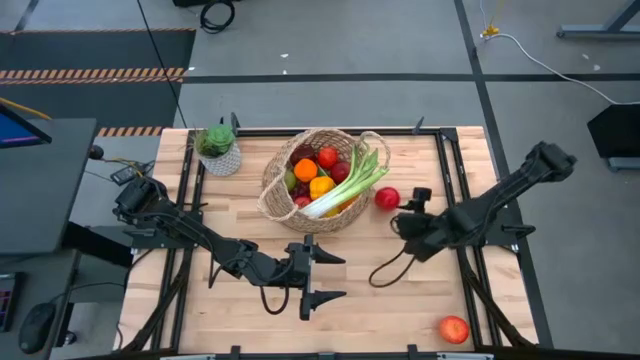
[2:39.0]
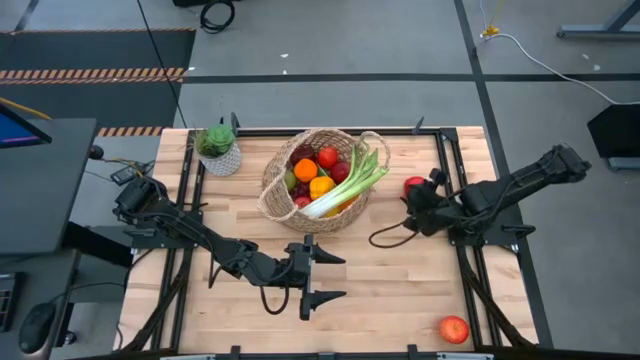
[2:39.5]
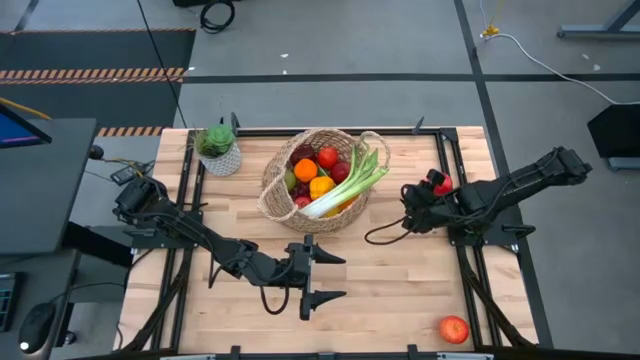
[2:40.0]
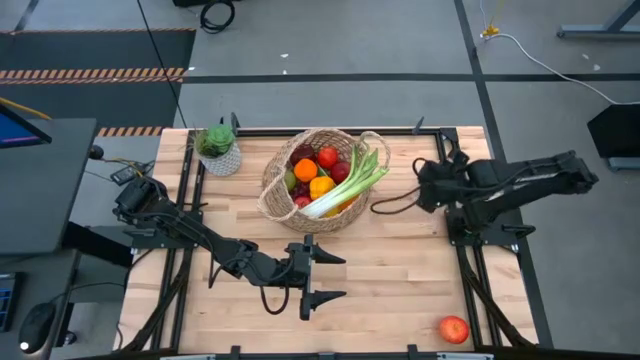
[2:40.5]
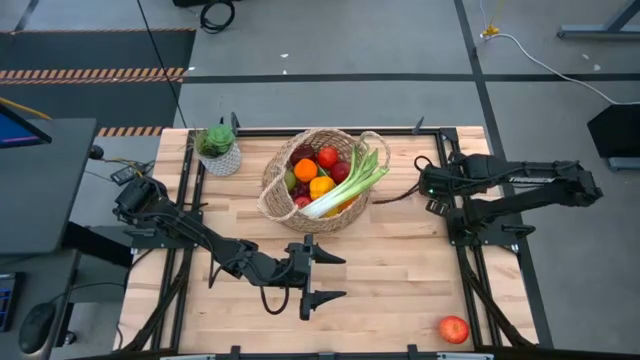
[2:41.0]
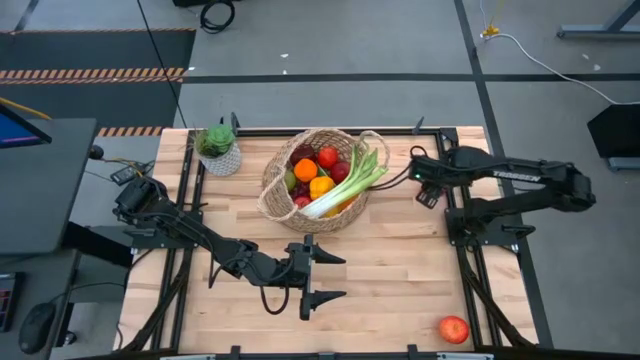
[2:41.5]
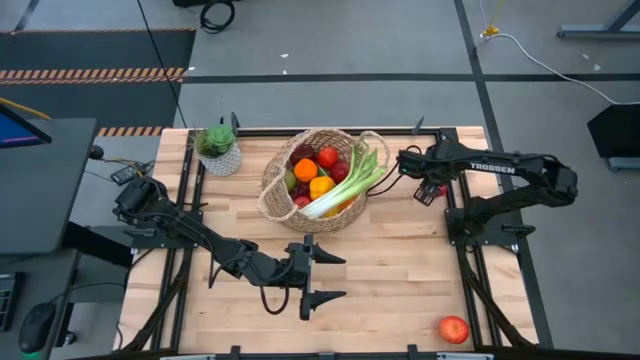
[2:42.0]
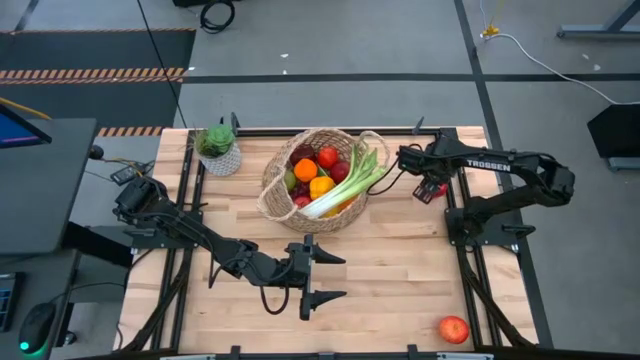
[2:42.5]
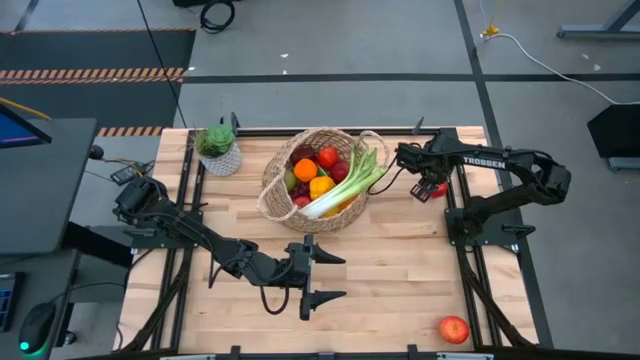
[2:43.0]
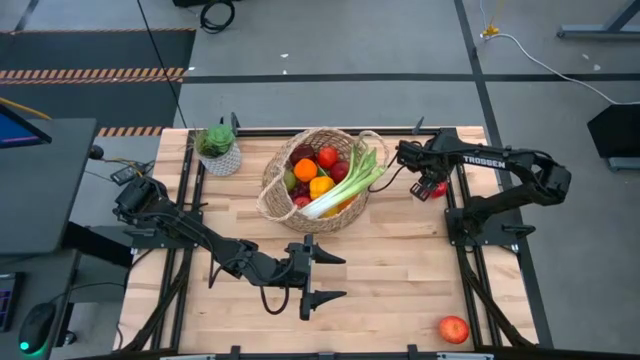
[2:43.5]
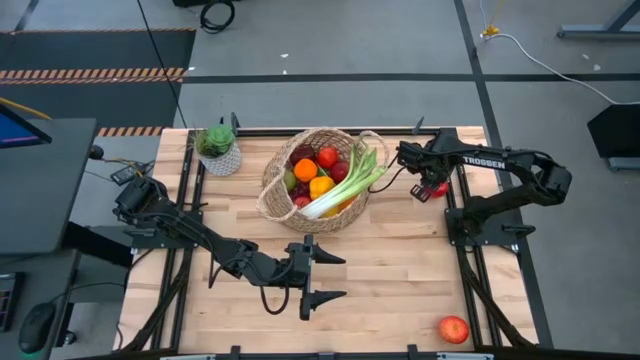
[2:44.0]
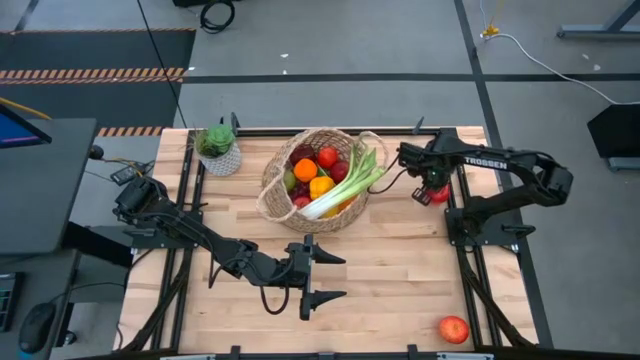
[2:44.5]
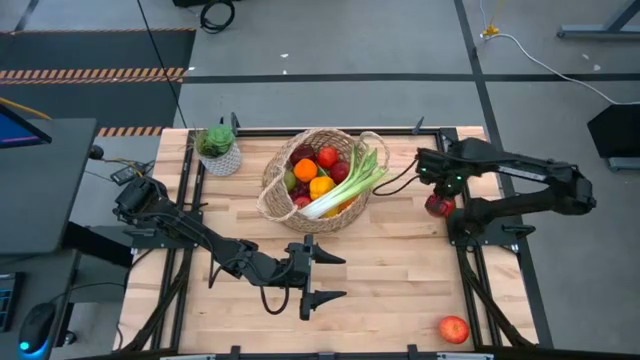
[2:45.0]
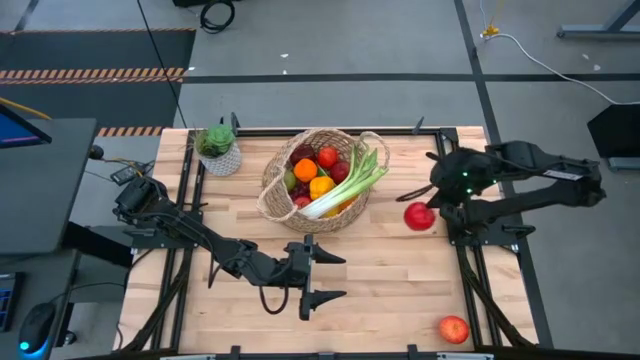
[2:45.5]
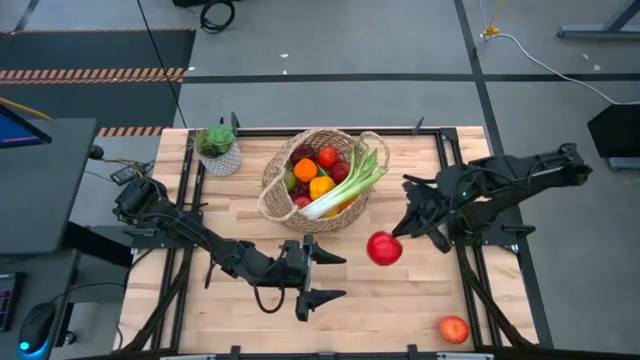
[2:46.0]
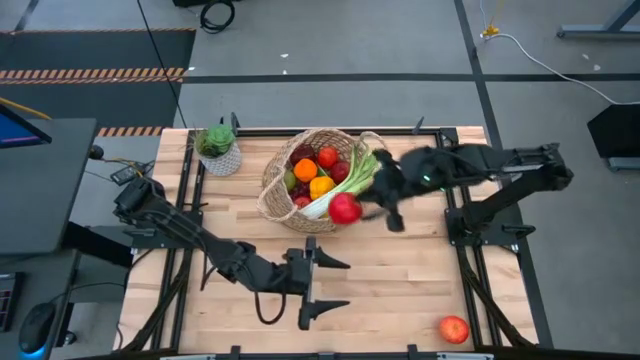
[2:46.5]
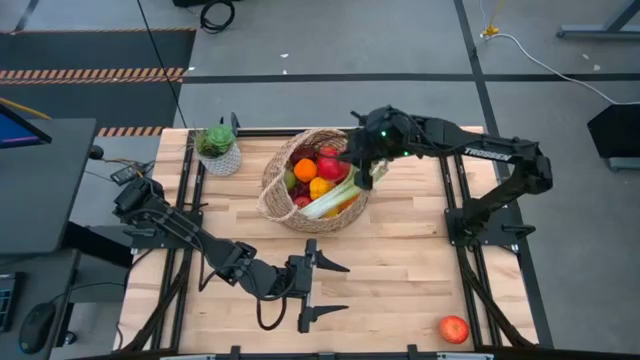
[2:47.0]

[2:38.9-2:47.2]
Task: Build produce basket
Put the apple into the basket

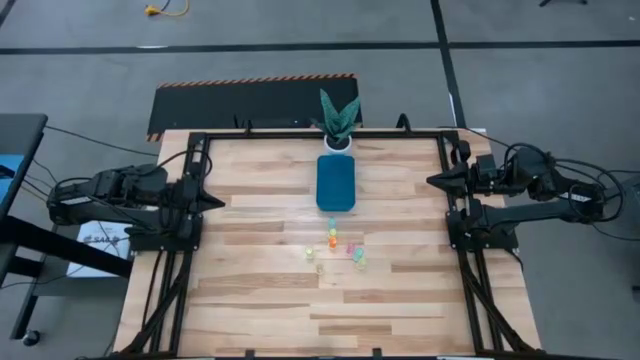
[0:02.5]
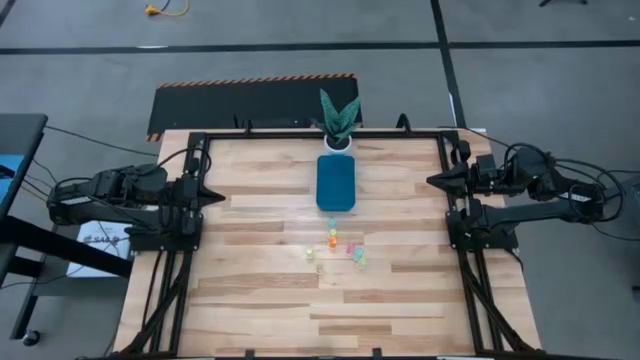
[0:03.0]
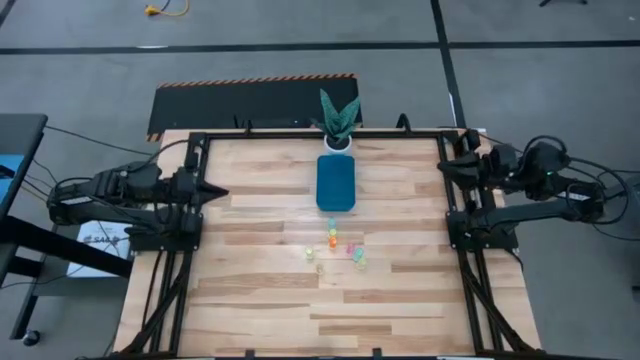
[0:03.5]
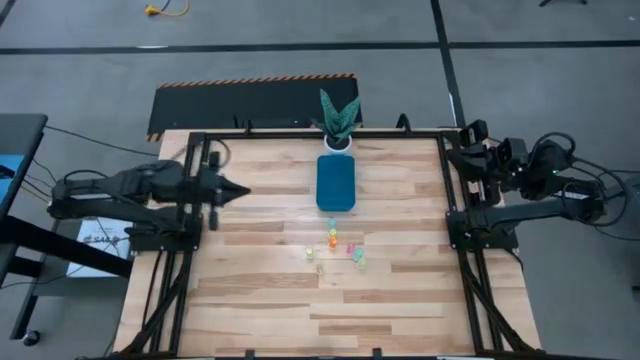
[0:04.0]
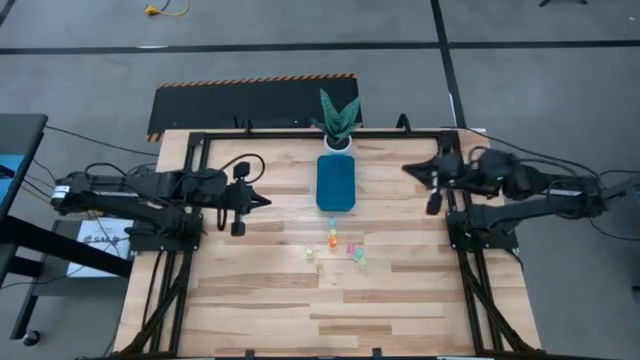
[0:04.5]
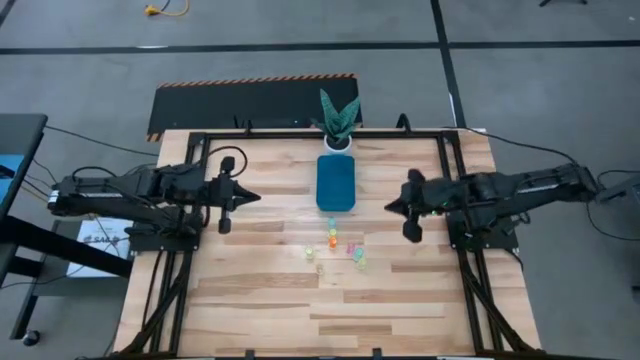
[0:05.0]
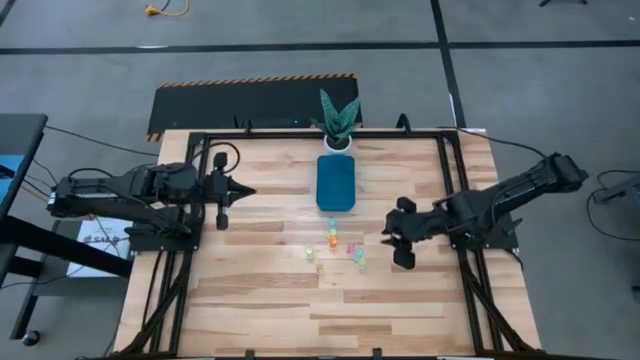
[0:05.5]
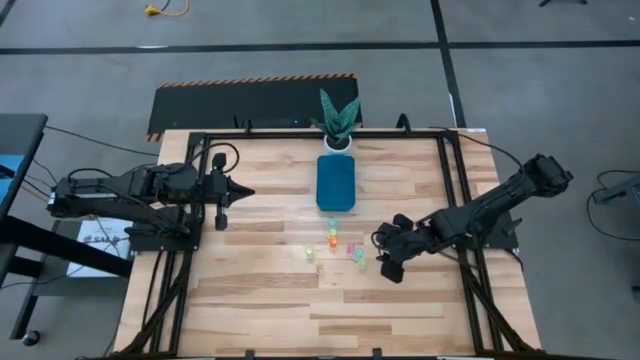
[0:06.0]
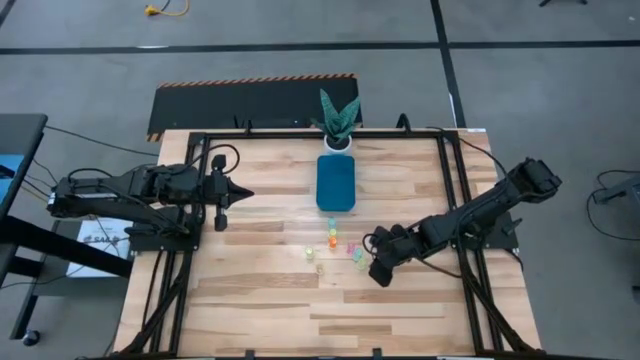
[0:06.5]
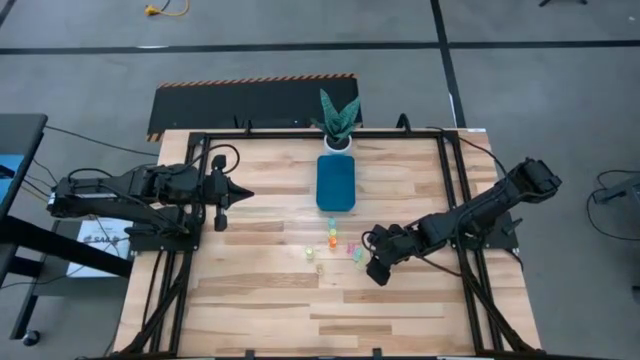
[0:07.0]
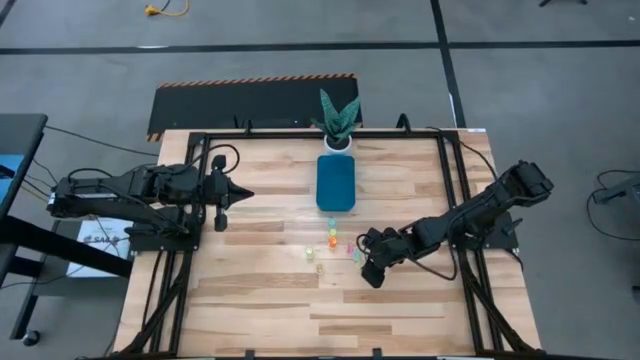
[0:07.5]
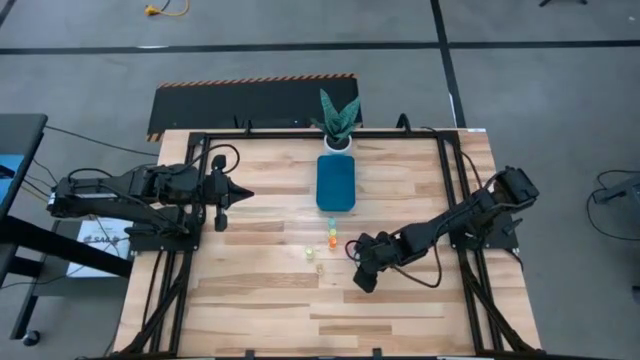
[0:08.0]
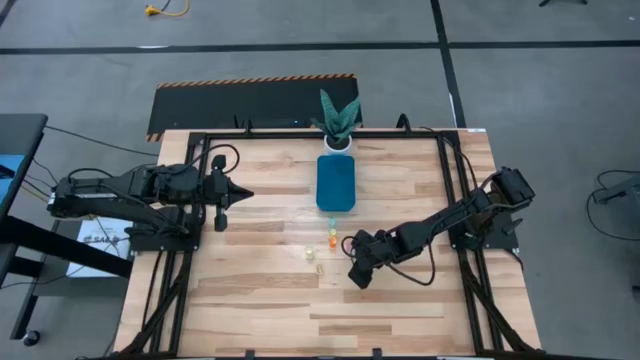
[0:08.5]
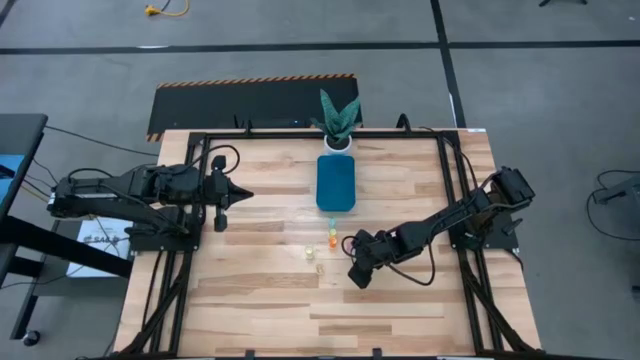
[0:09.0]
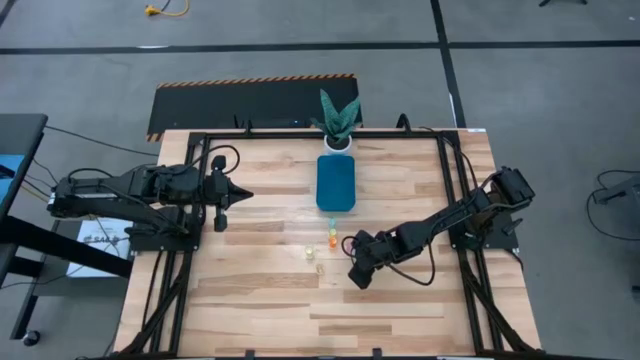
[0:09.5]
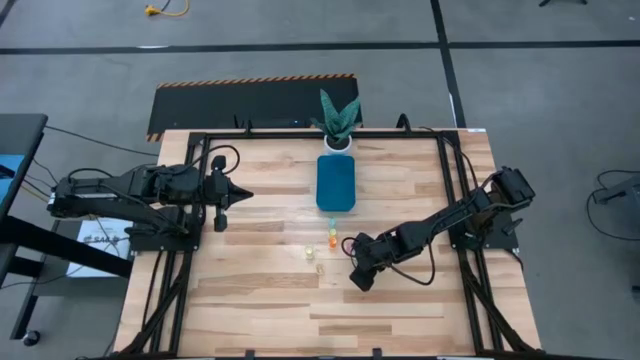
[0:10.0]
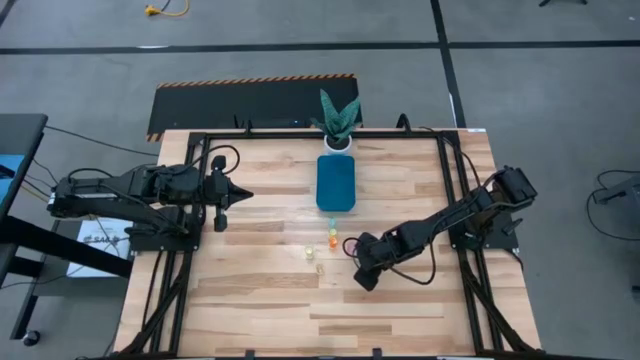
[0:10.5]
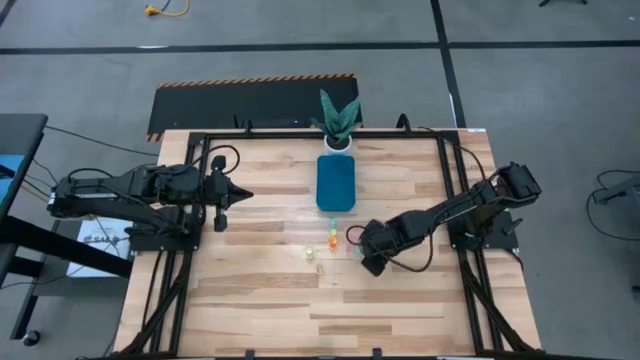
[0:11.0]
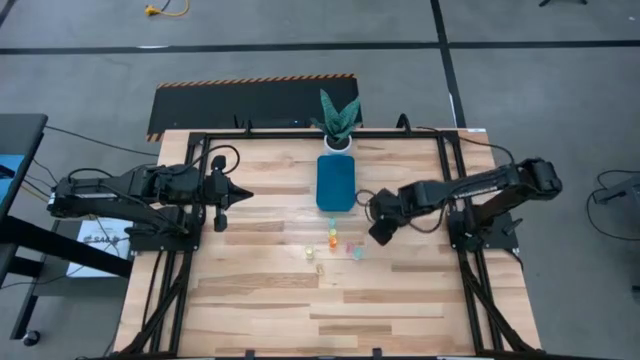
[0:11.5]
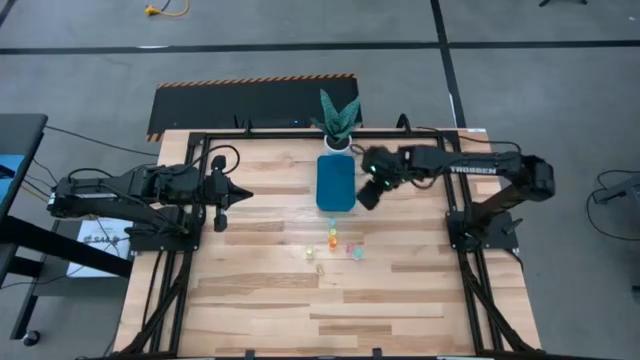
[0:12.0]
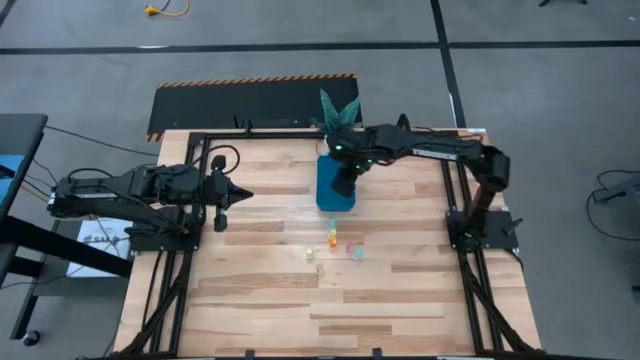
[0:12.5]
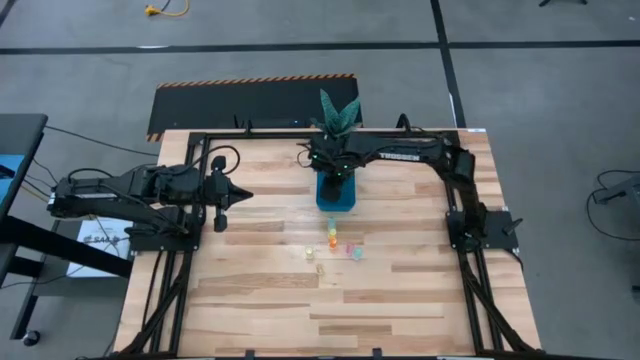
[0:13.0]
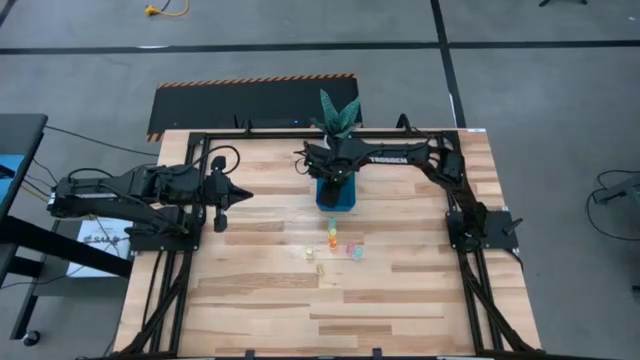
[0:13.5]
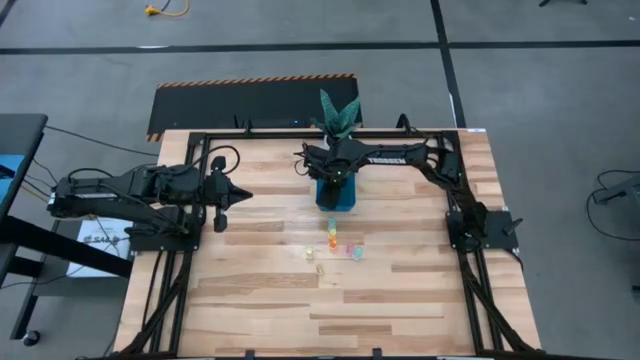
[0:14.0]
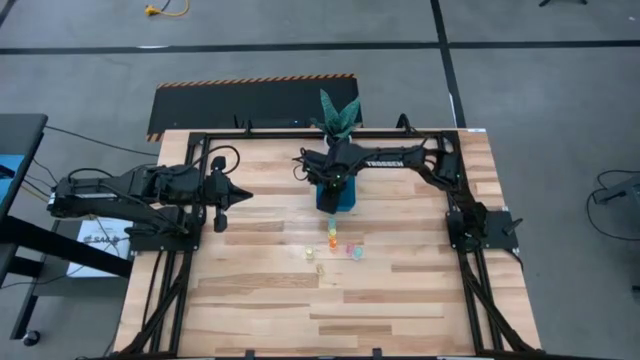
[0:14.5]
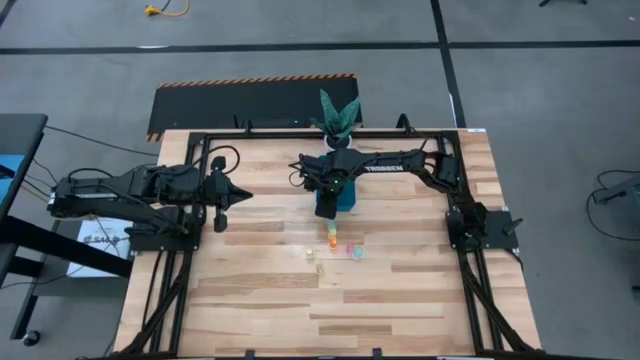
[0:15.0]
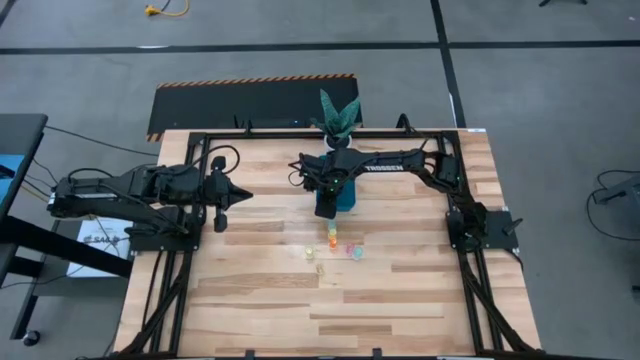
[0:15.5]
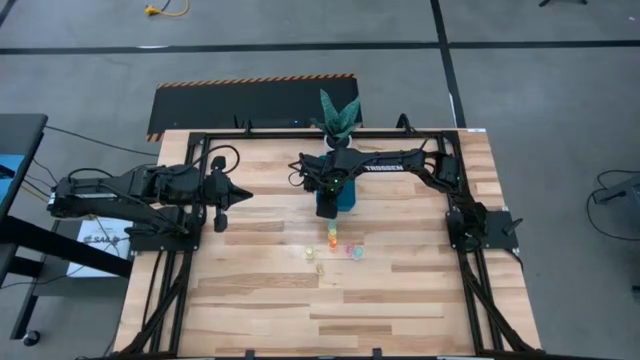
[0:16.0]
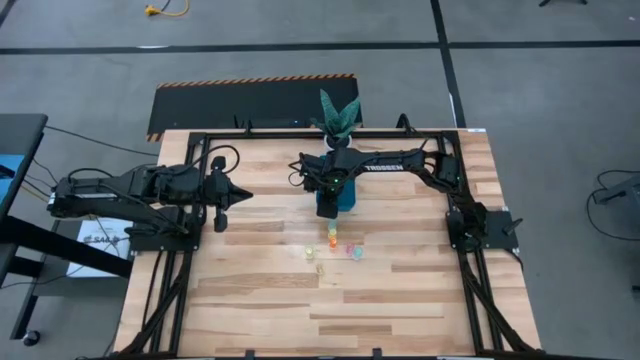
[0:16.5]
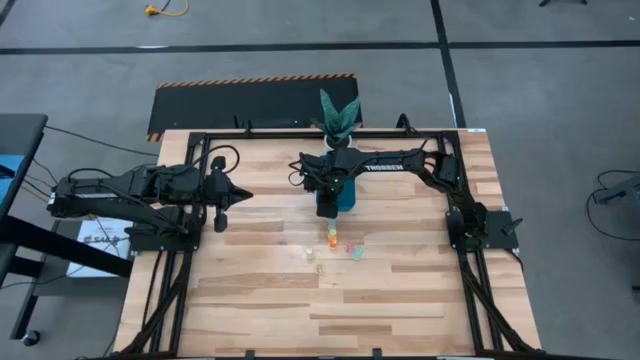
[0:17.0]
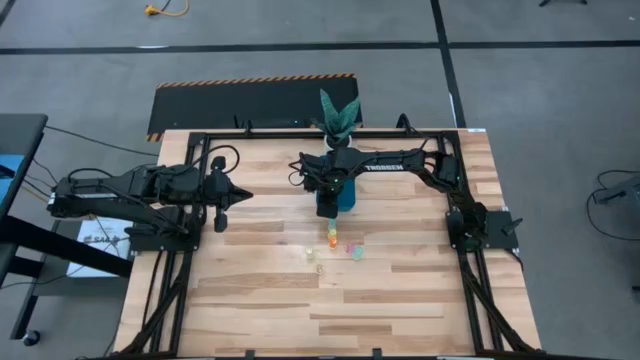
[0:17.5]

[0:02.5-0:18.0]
Task: Pick and place pill bottles into a basket
Put the yellow pill bottle into the blue bin
